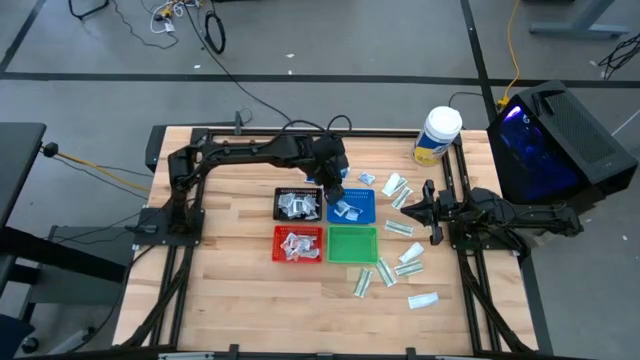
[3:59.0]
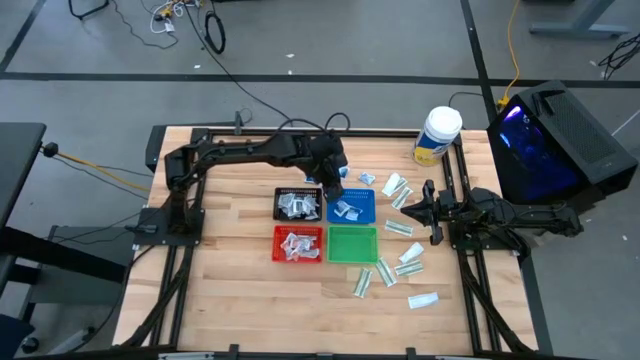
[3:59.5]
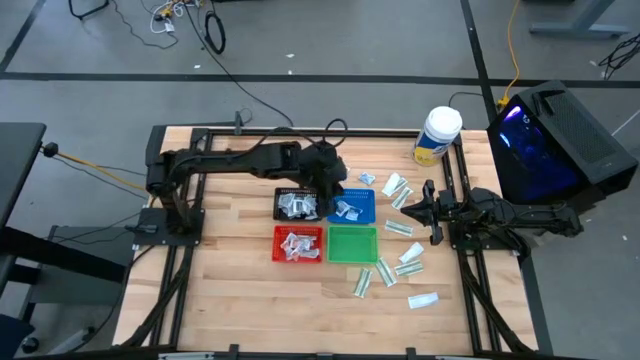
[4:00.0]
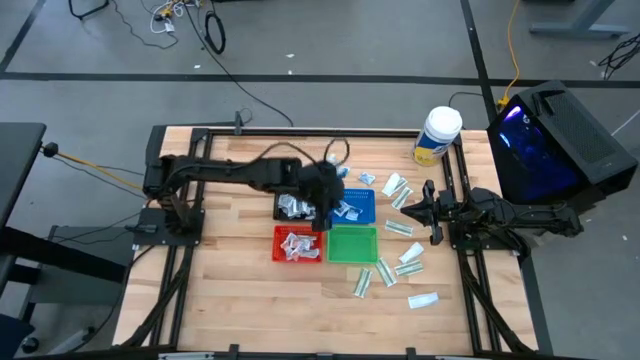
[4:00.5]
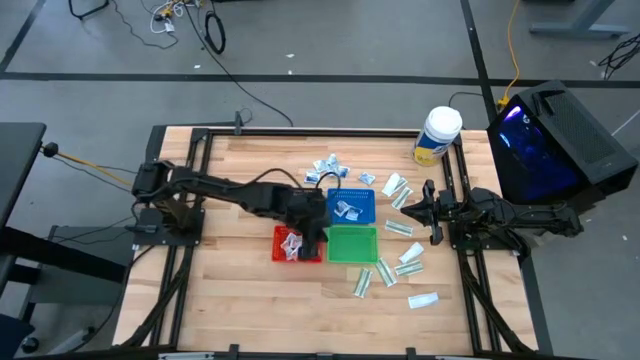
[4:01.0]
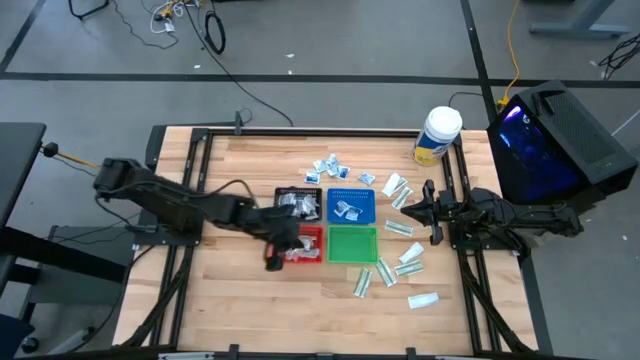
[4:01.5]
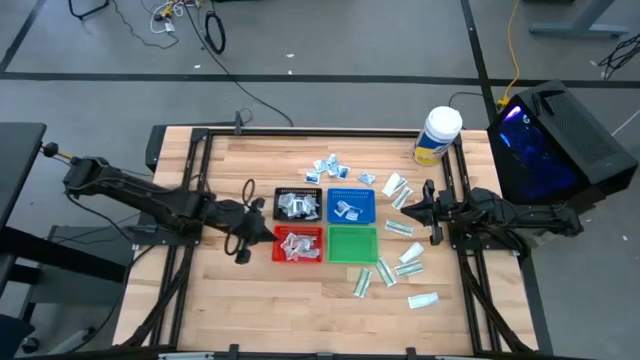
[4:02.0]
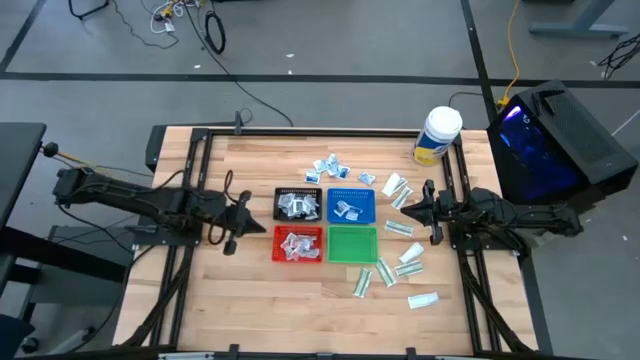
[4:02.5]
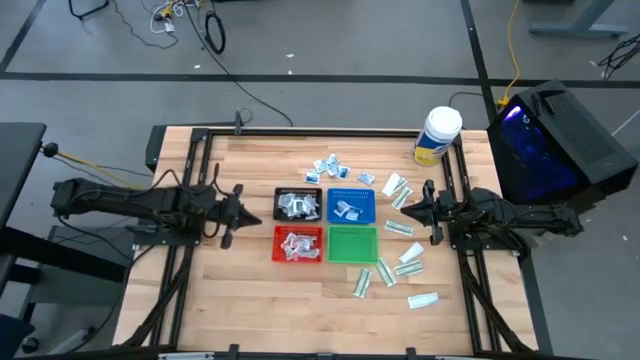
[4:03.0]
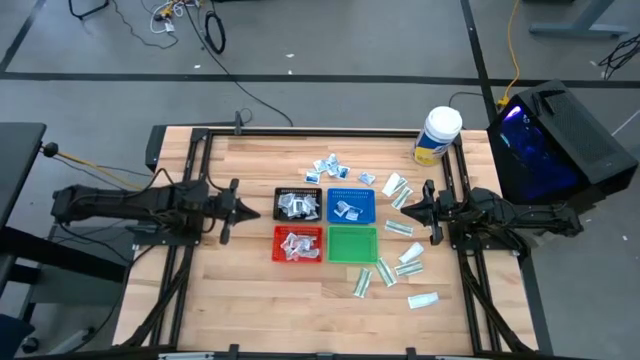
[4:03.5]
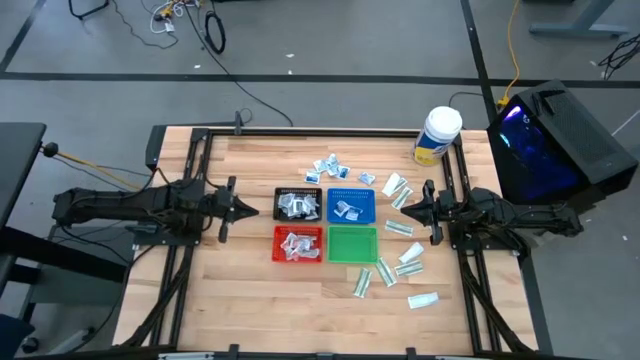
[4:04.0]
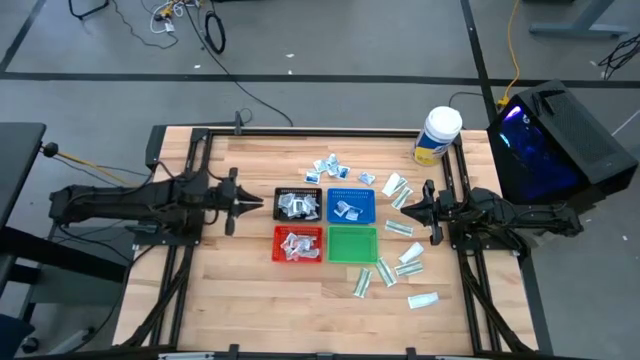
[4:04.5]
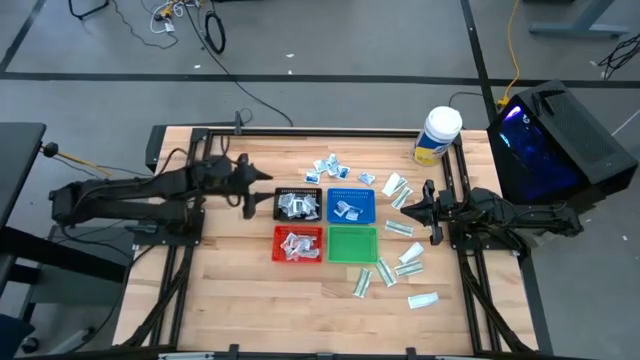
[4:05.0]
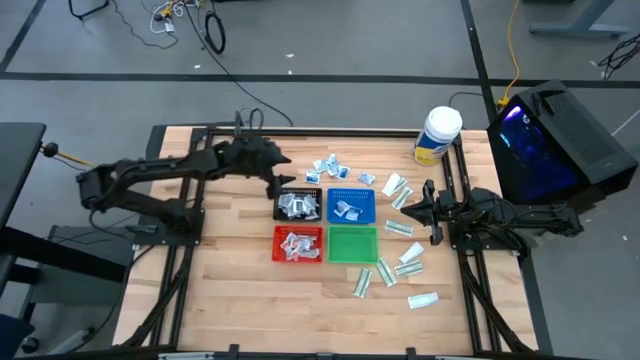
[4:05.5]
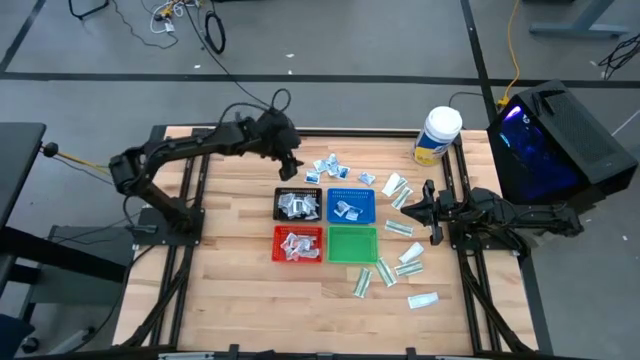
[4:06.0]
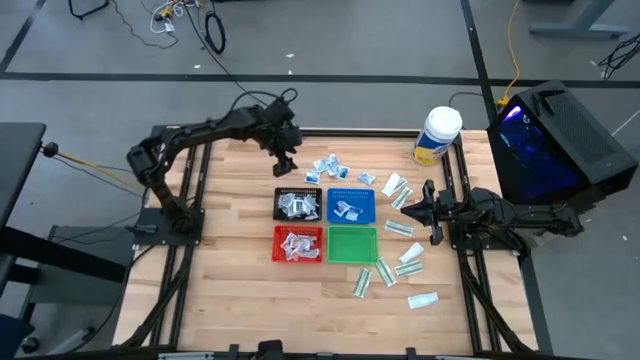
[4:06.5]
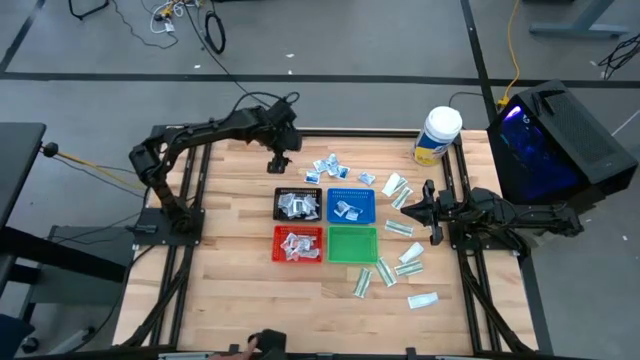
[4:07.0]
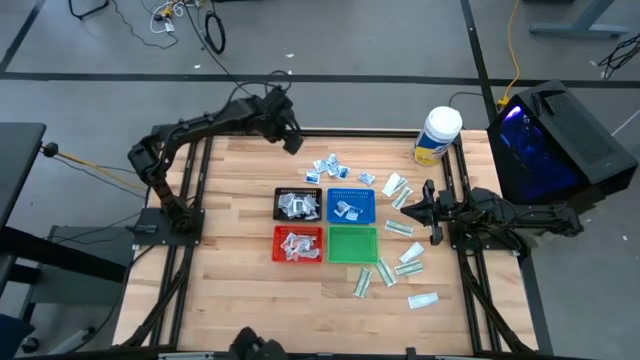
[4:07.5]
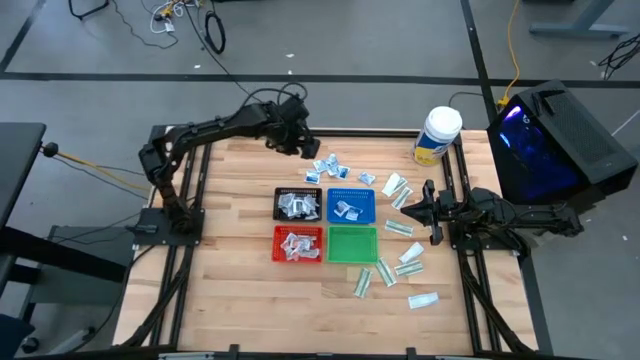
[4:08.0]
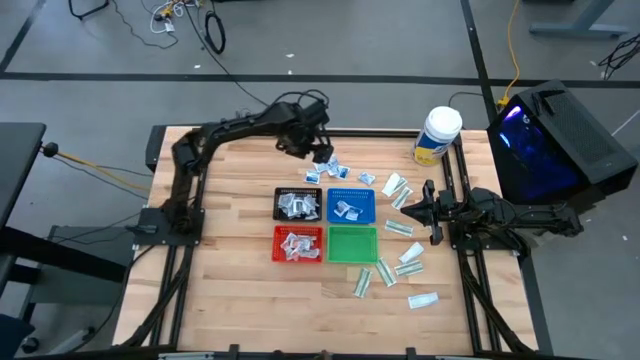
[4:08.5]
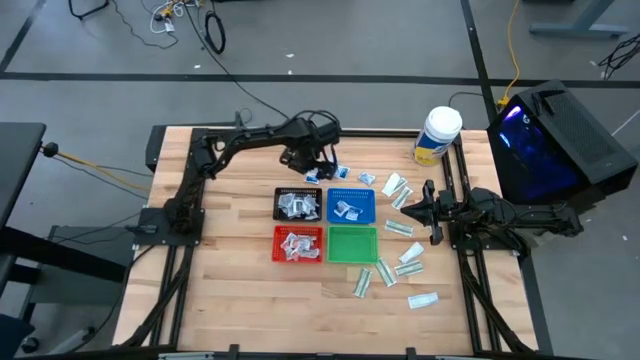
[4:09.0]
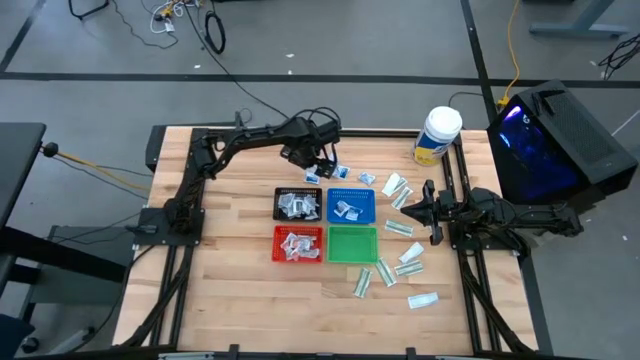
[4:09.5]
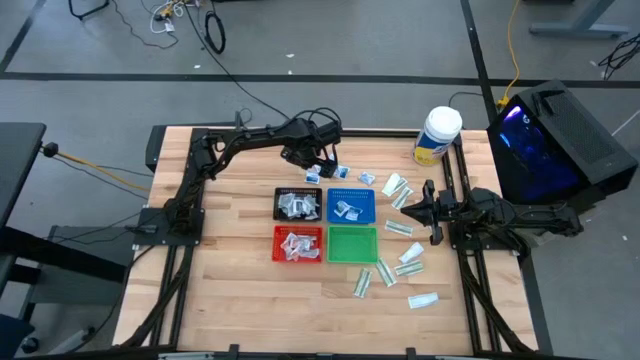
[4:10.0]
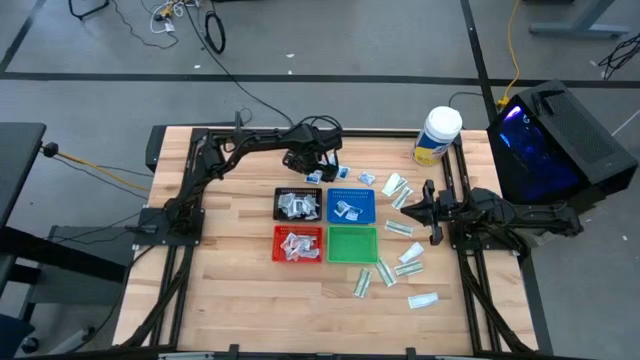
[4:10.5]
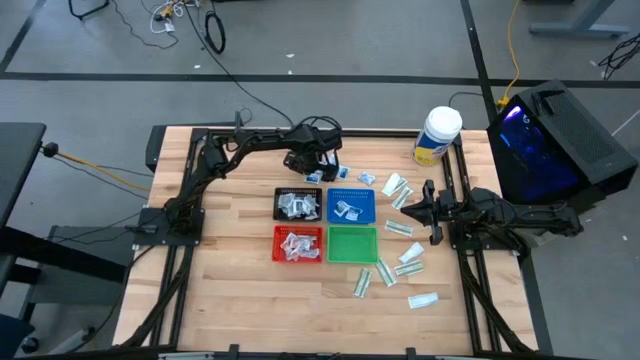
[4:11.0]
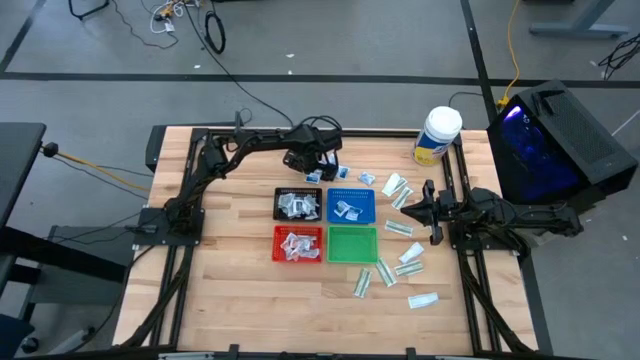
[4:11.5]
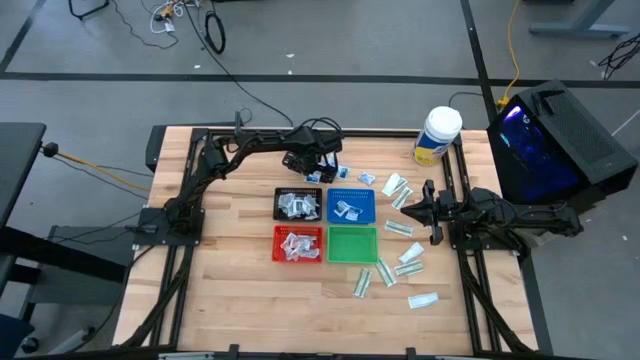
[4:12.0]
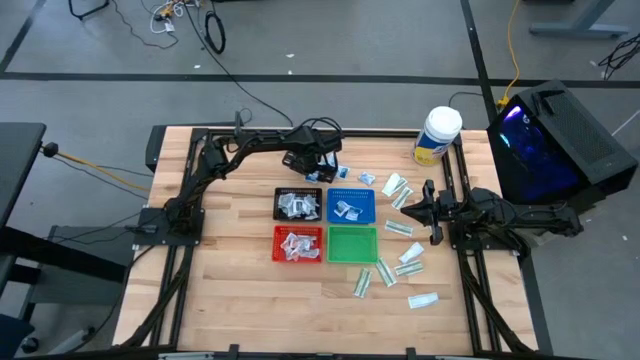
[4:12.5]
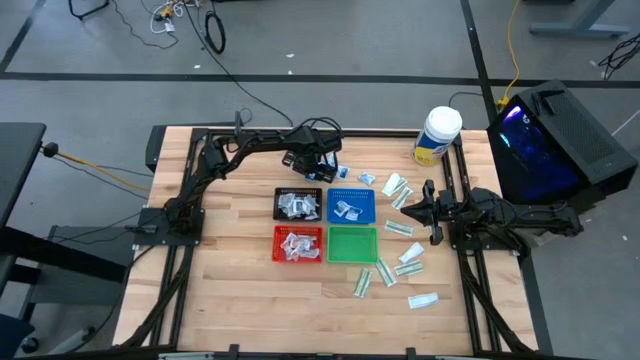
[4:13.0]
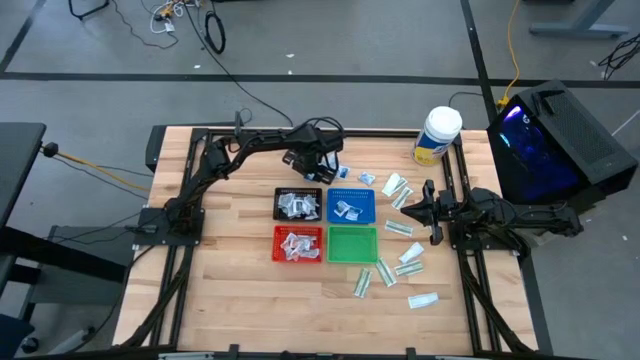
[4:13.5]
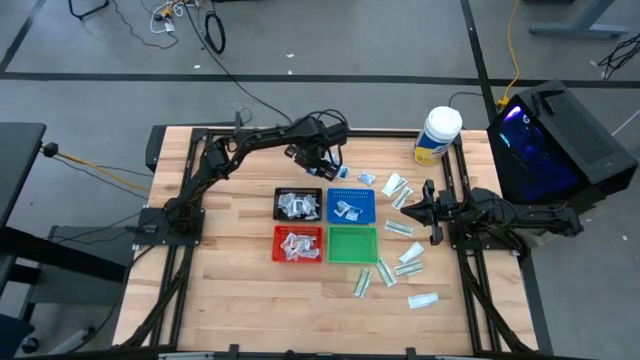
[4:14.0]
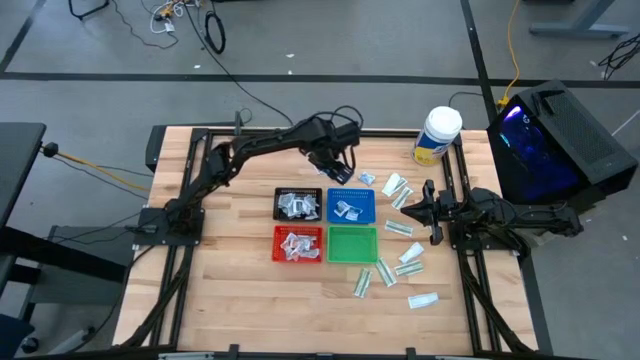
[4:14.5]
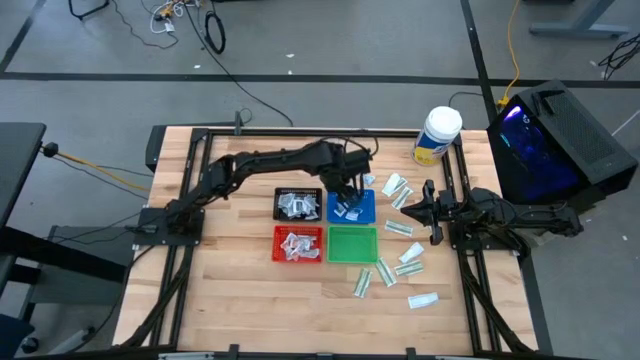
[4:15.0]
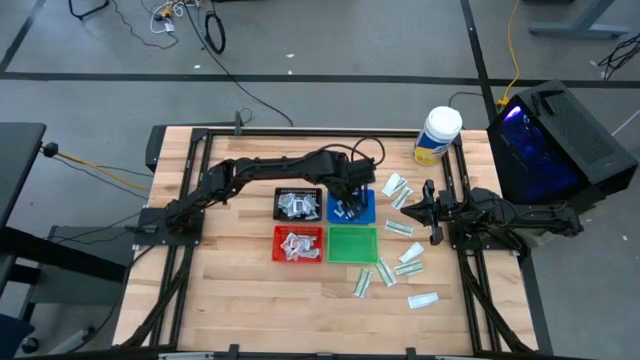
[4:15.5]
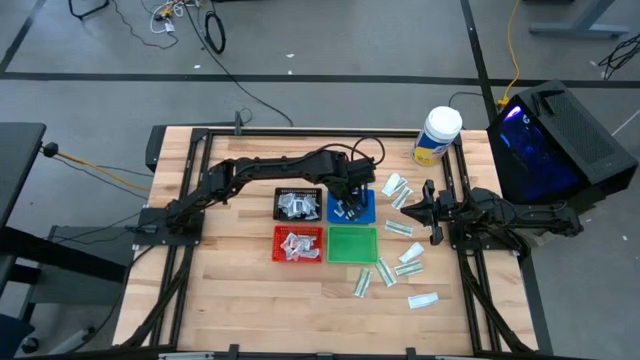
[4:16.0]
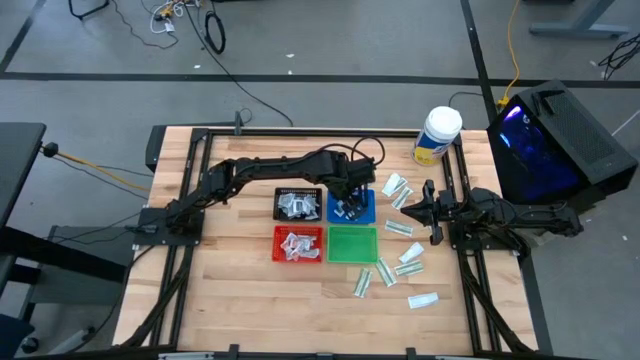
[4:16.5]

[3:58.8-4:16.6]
Task: Pick & Place First Aid Supplies
Put the blue alcohol pad into the blue bin

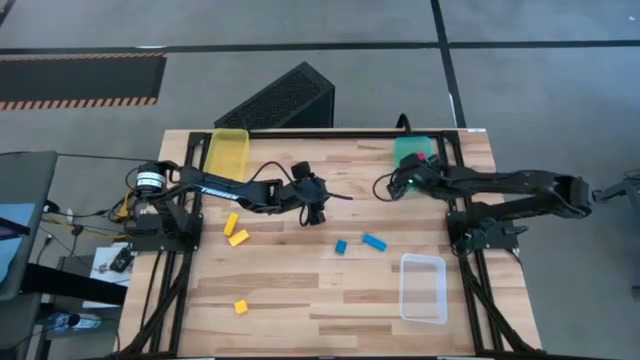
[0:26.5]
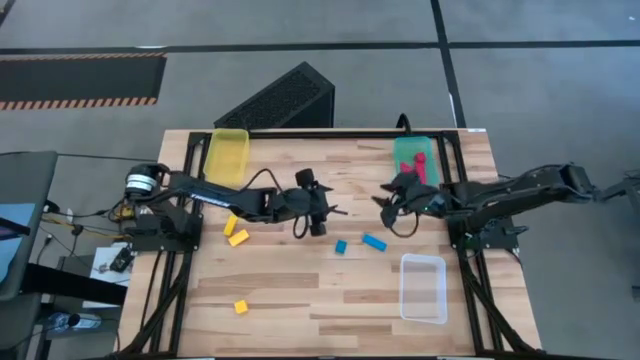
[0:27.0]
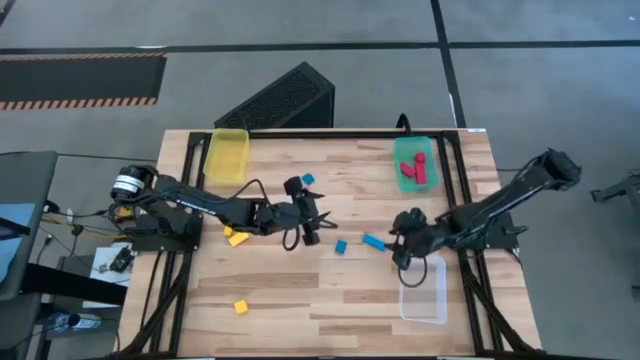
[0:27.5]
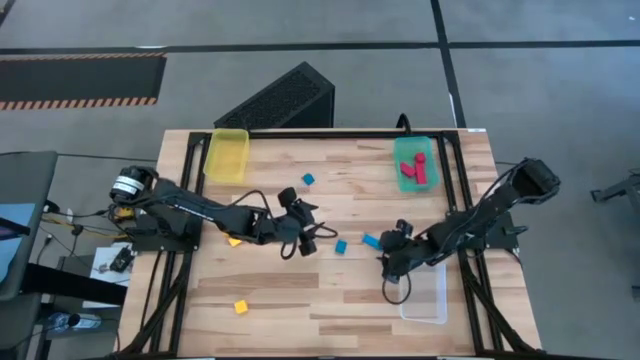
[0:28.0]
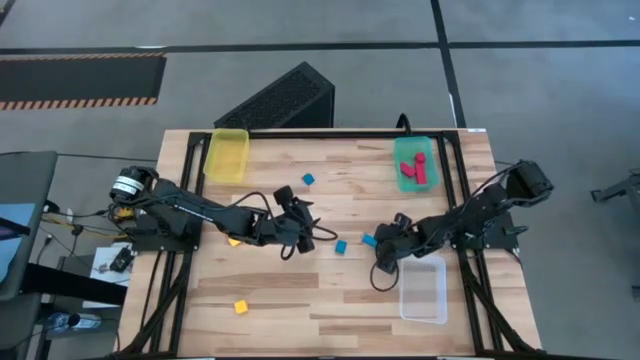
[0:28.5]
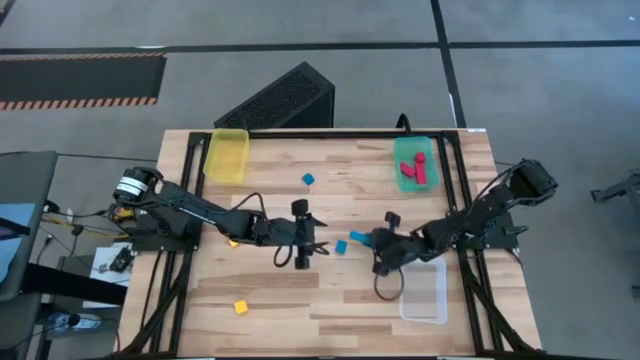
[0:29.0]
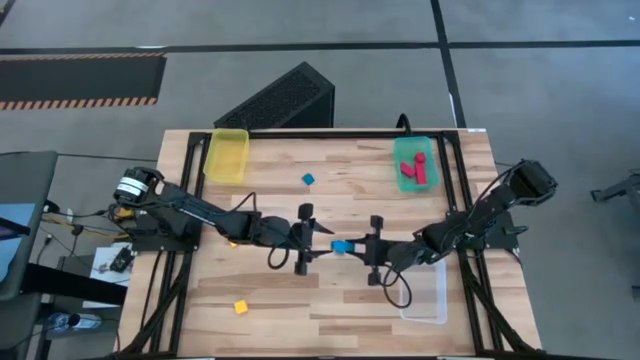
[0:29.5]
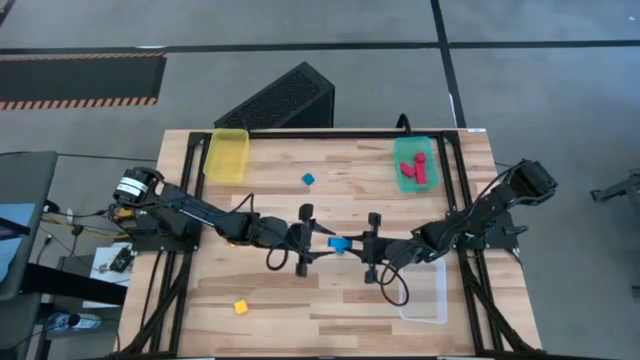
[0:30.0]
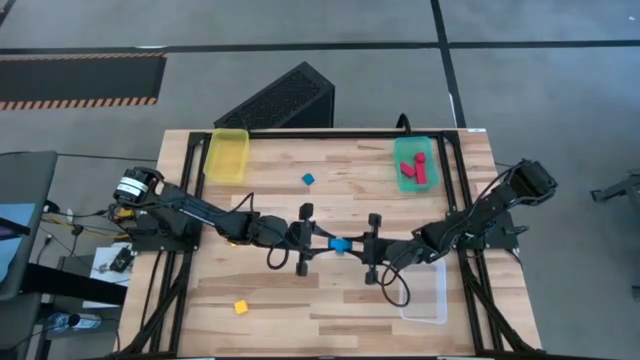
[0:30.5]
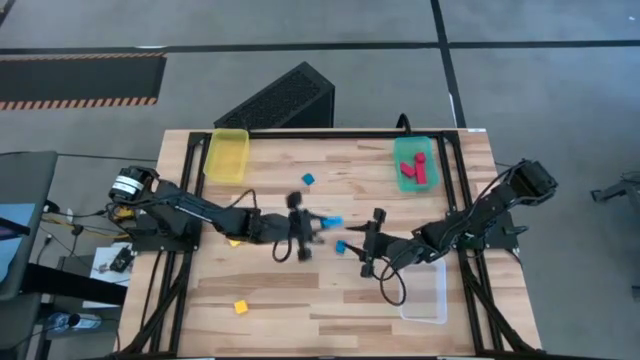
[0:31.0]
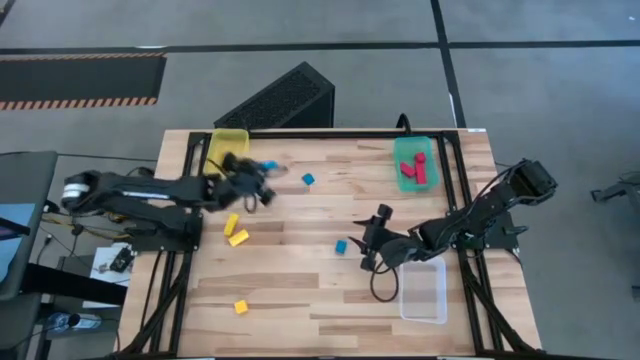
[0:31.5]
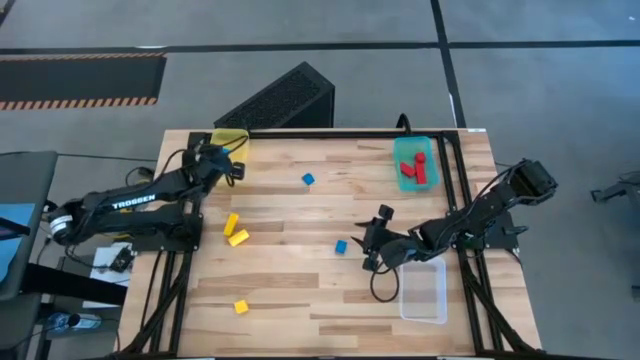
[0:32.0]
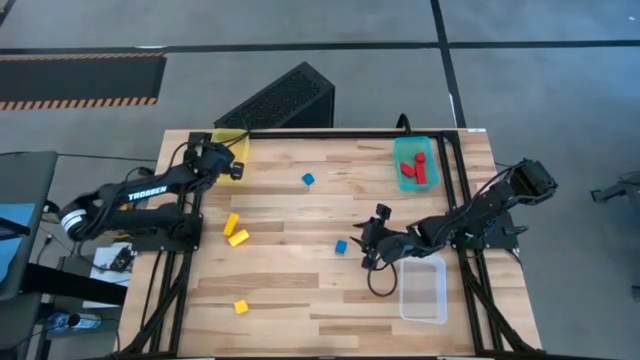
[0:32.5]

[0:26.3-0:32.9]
Task: Sort & place blocks by color
Put the bottom right blue block into the yellow bin
